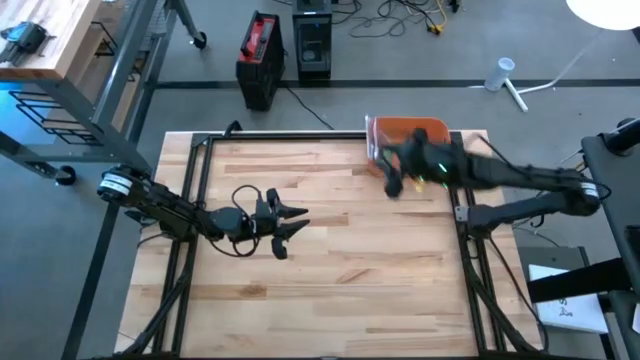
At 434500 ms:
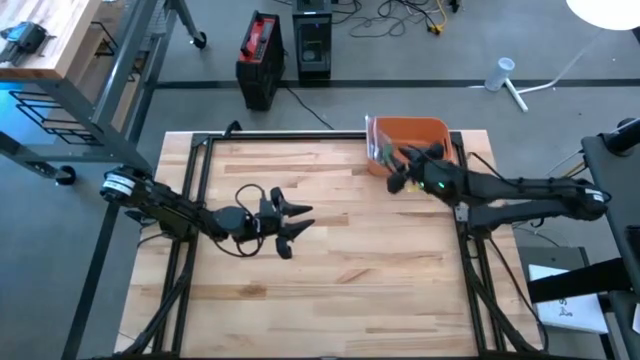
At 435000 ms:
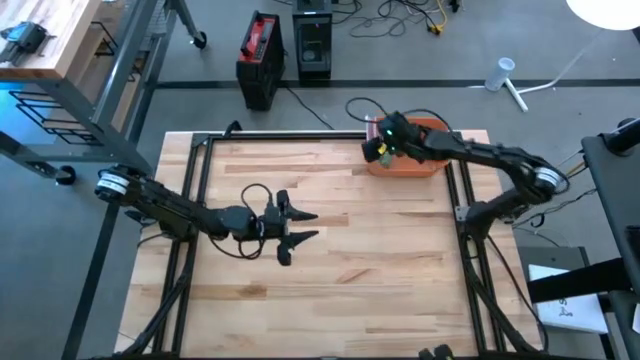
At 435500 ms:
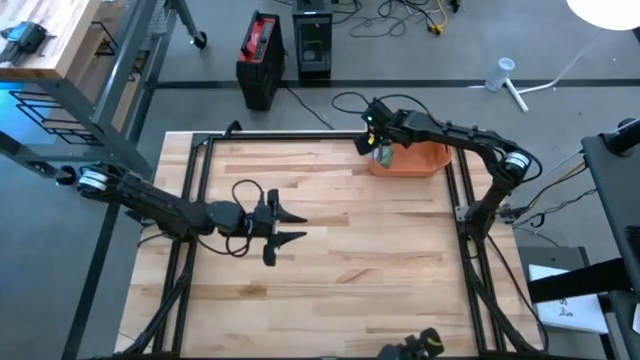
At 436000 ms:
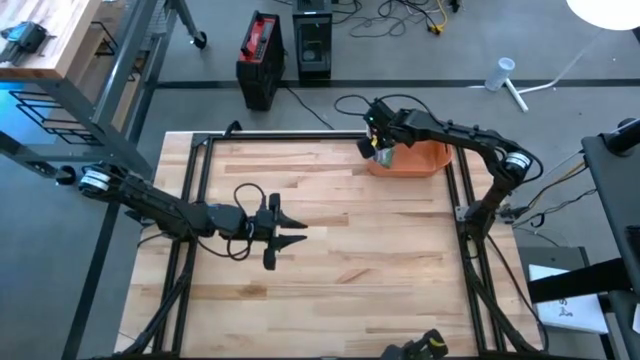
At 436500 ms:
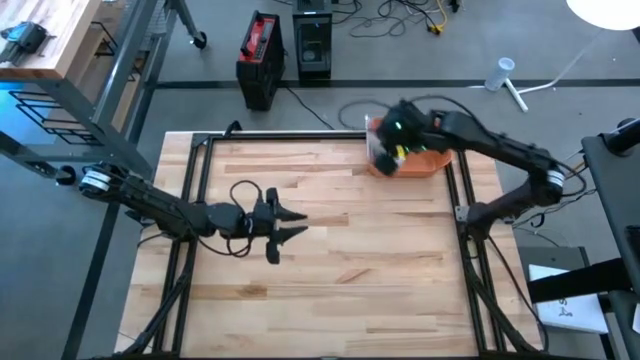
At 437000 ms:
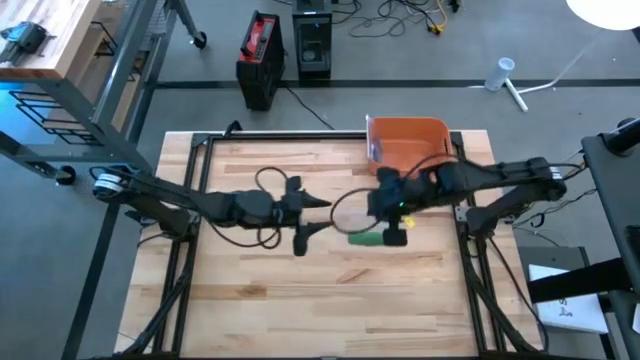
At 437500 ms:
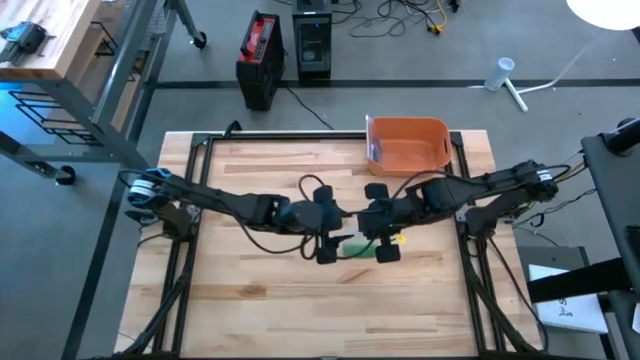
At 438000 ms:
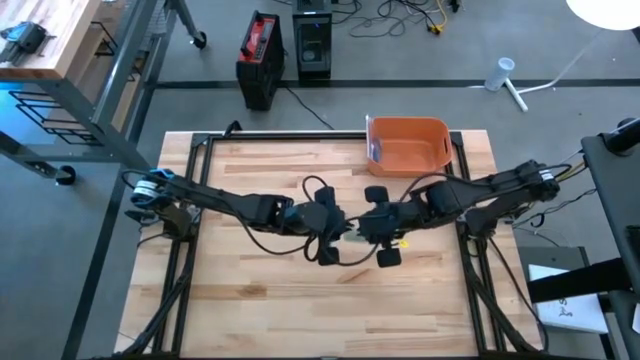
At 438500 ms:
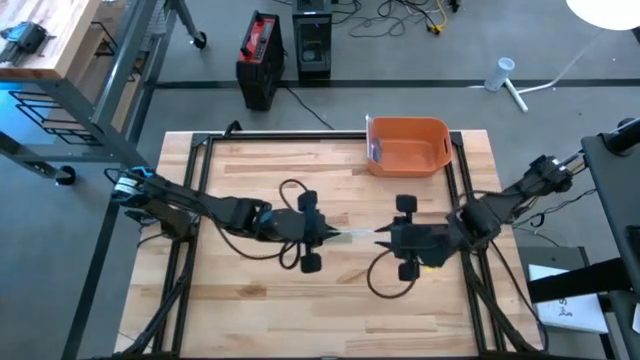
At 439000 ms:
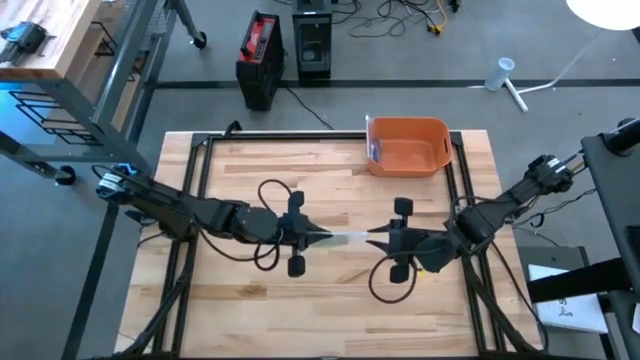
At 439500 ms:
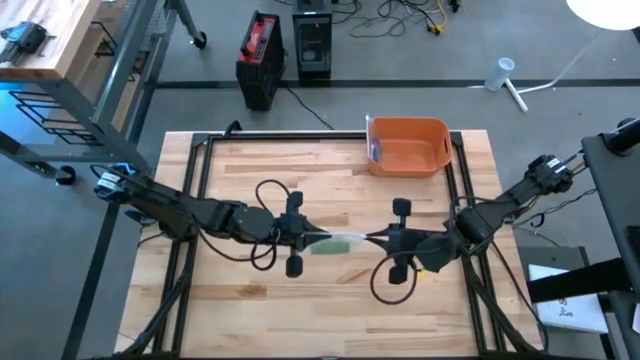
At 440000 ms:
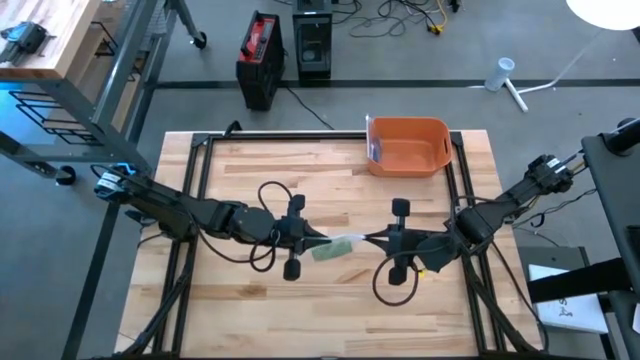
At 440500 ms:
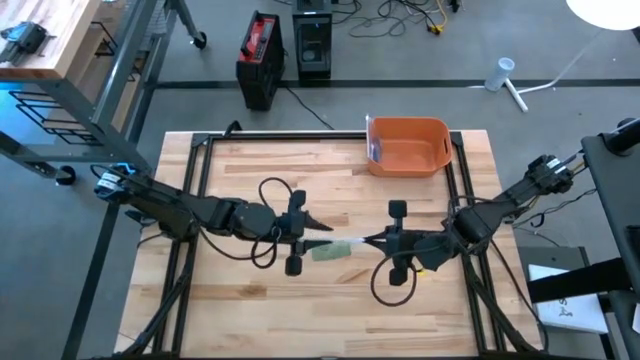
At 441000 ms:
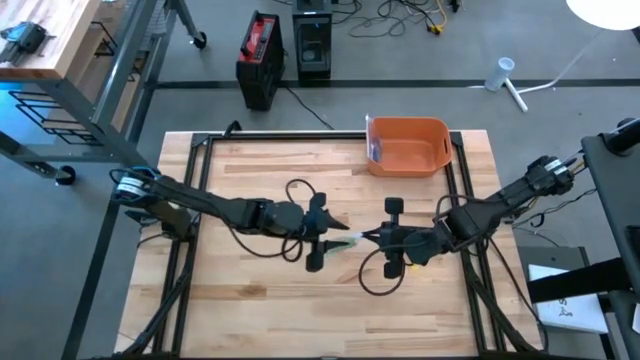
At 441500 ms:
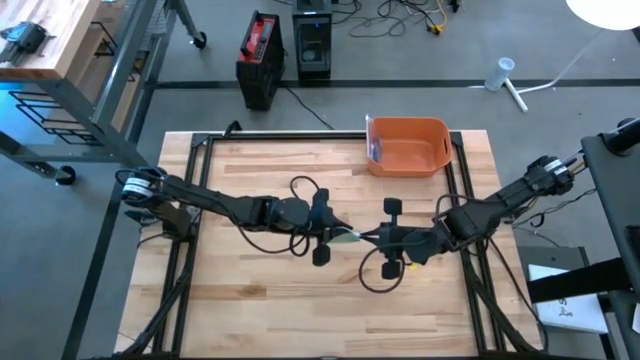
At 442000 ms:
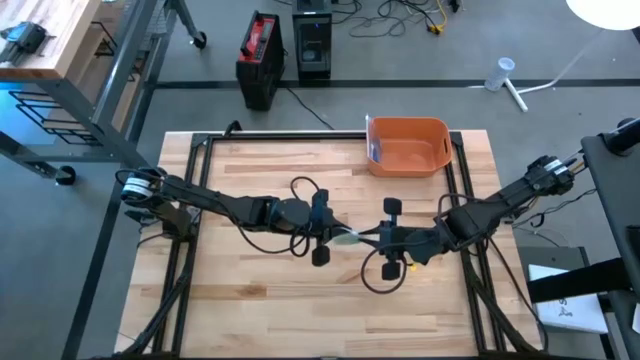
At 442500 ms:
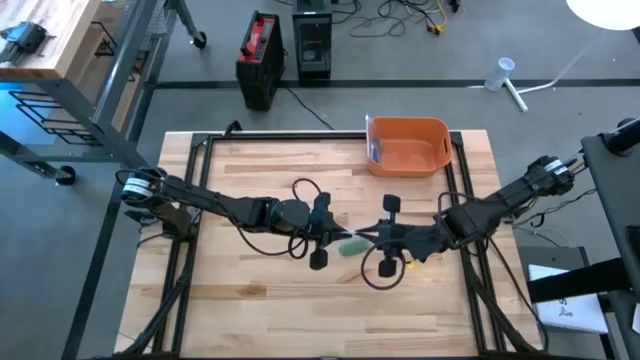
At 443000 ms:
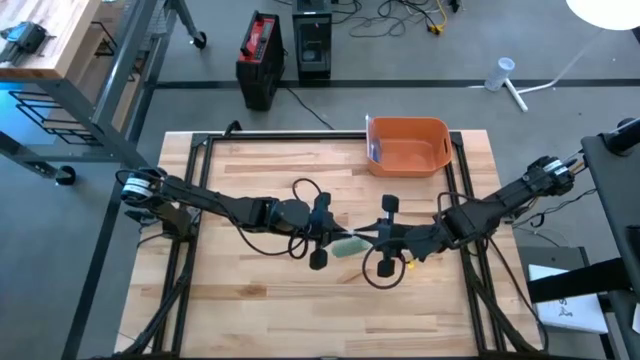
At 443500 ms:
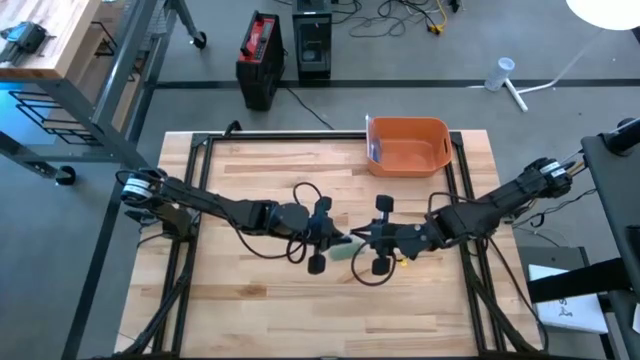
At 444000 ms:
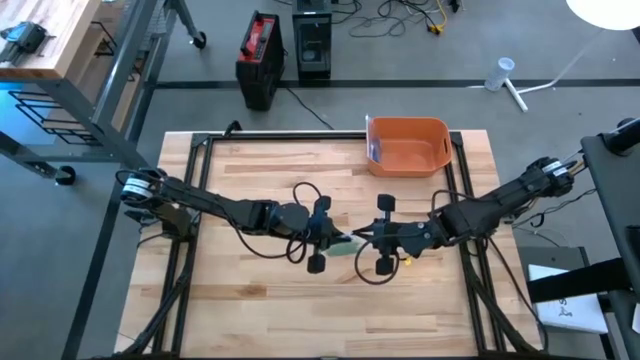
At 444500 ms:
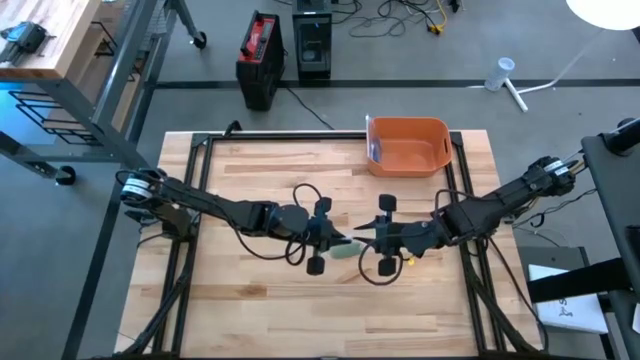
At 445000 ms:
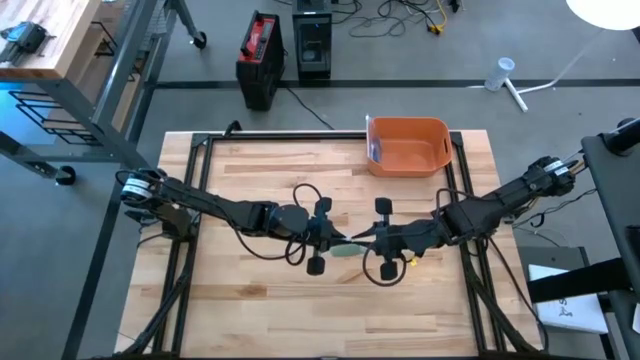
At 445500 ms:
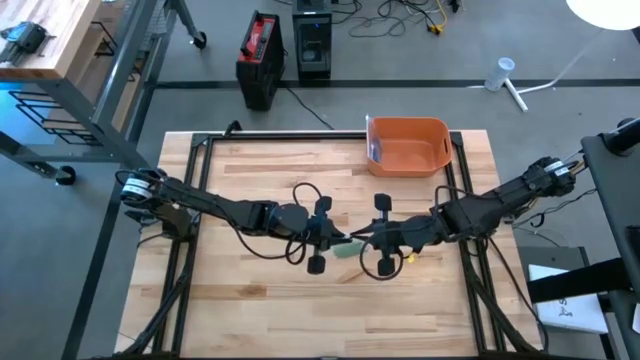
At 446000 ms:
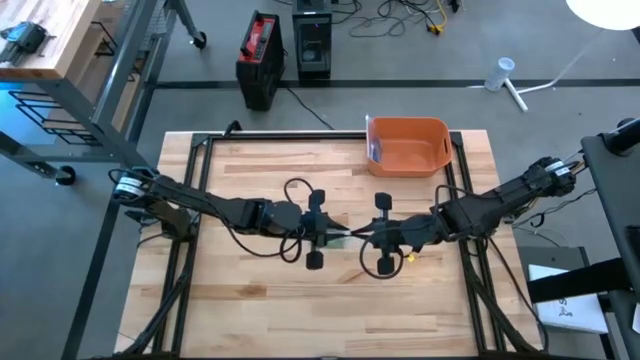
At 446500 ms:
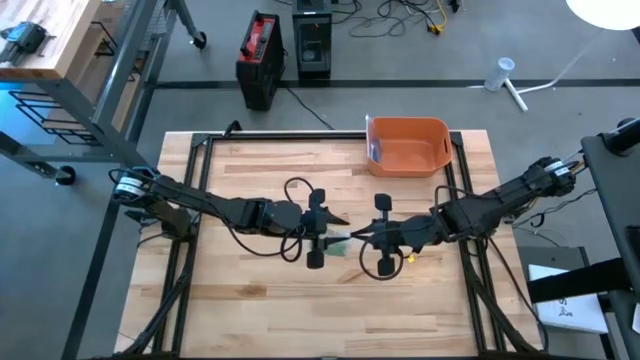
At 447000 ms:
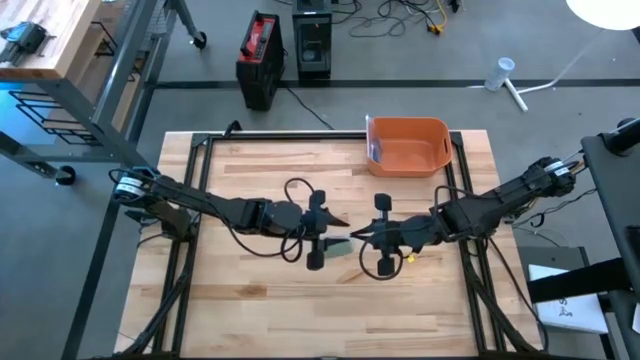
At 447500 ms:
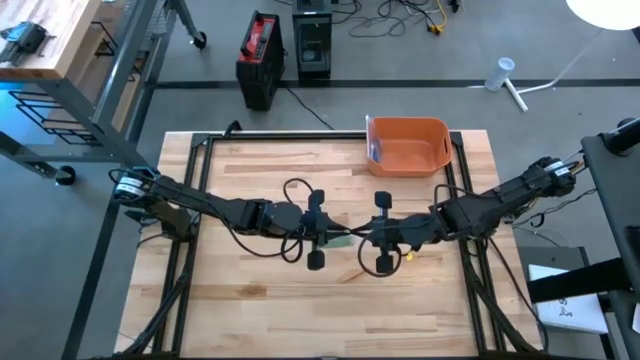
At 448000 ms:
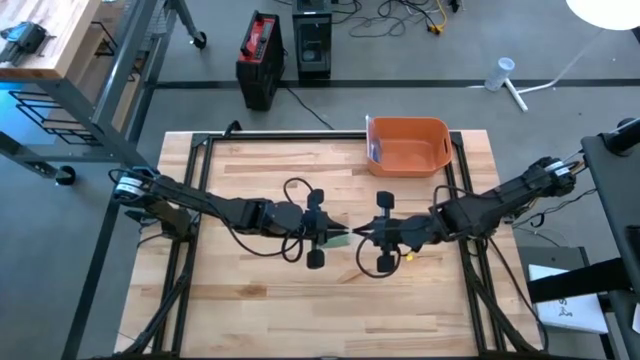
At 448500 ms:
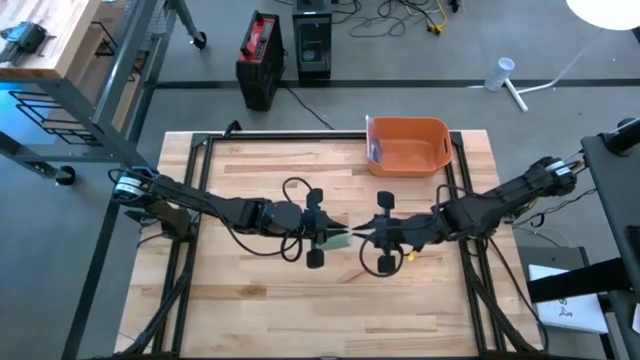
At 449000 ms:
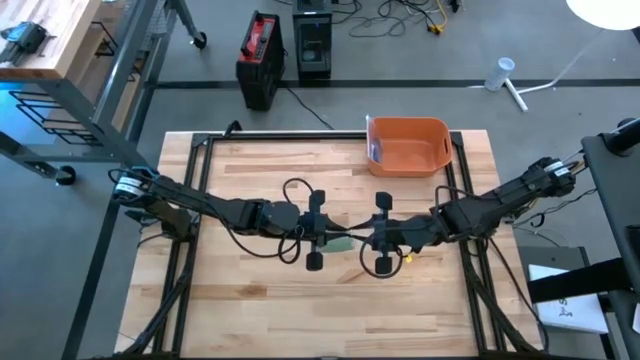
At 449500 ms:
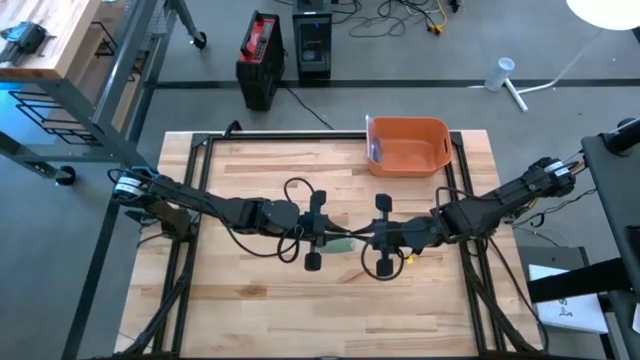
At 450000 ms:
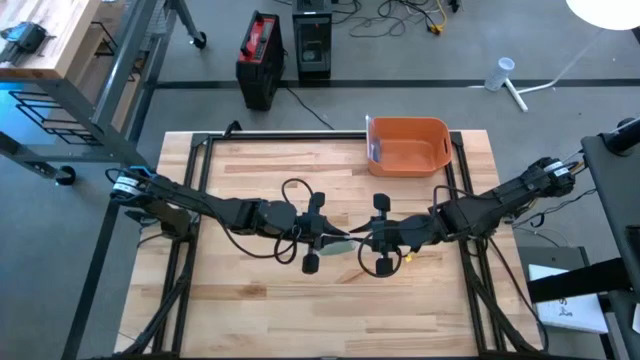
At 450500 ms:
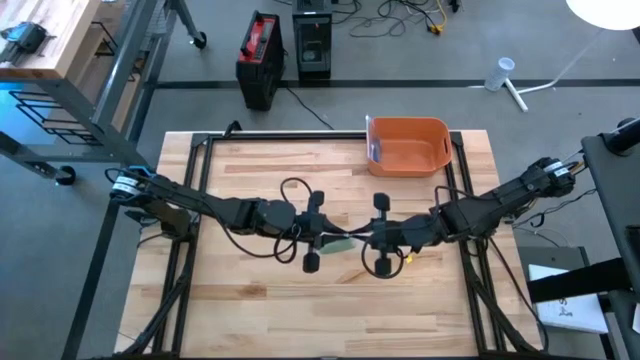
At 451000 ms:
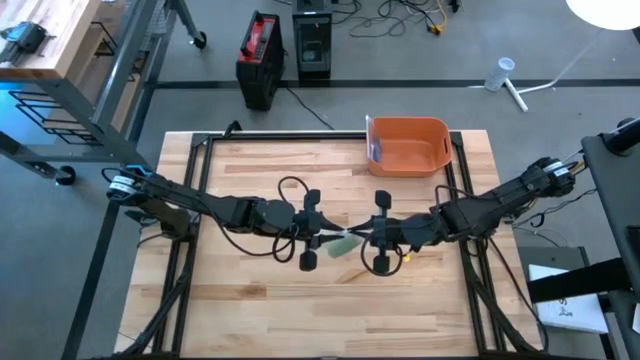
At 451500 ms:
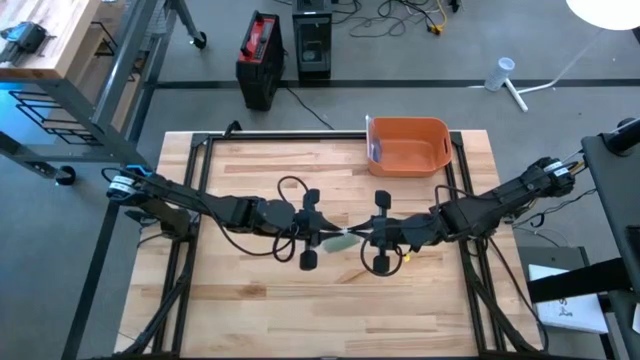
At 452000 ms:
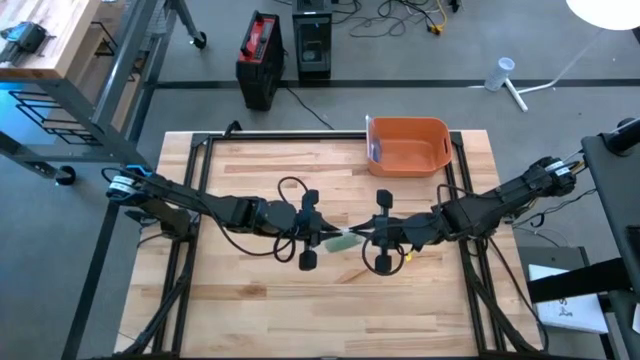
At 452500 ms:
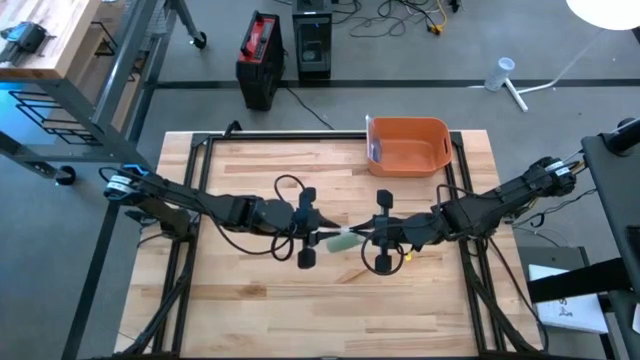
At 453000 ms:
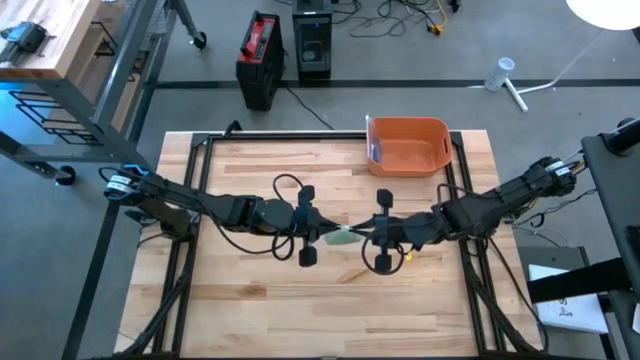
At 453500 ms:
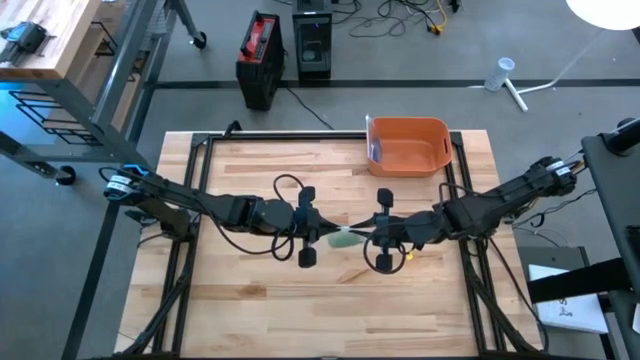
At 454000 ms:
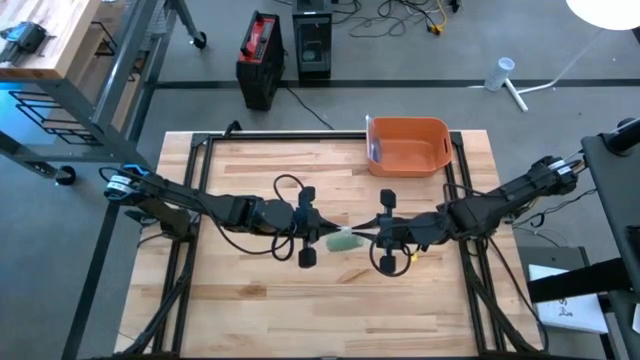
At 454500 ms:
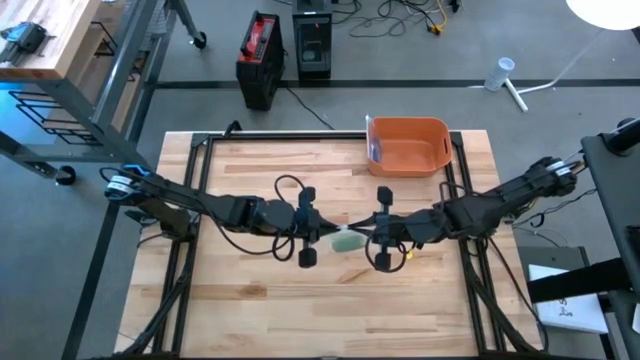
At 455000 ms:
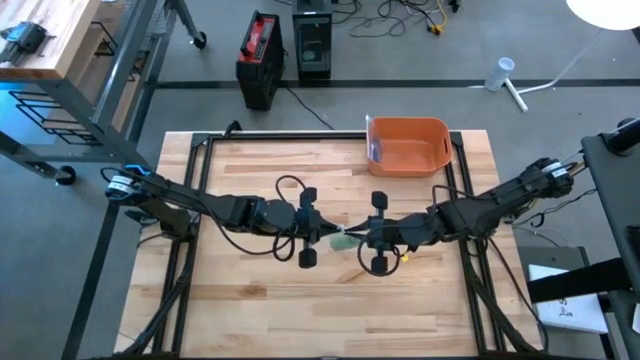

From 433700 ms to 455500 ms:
Task: Roll bandage
Close the transparent zip bag
